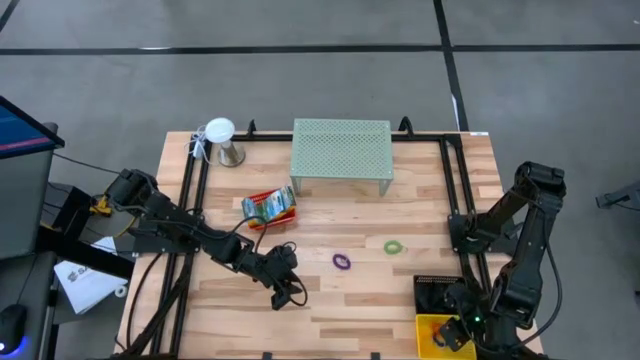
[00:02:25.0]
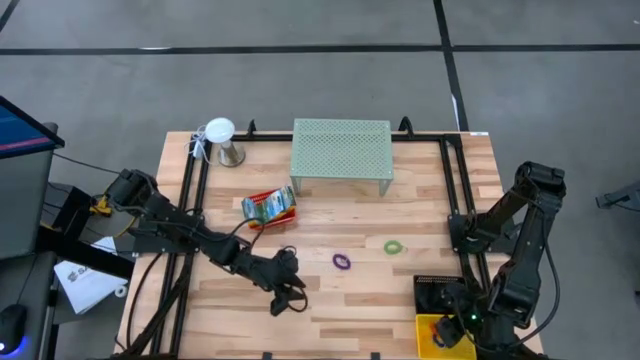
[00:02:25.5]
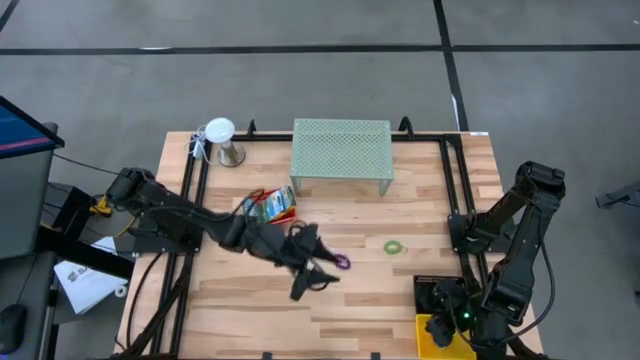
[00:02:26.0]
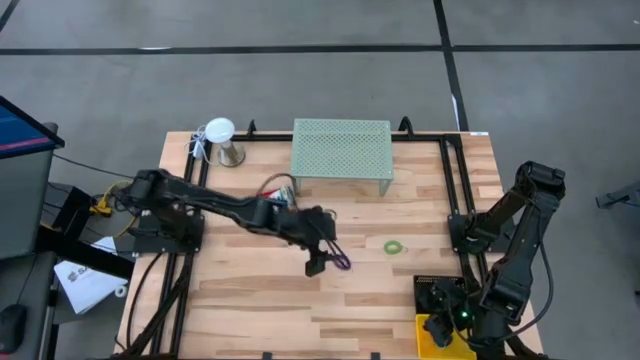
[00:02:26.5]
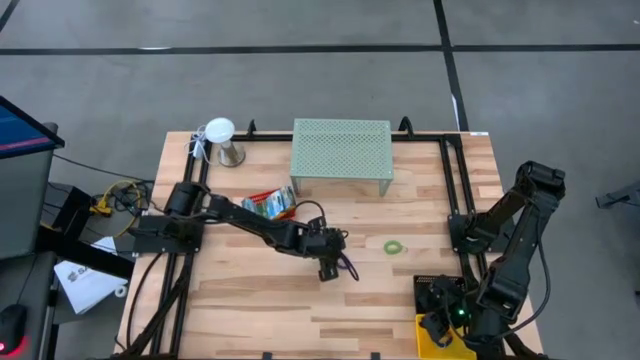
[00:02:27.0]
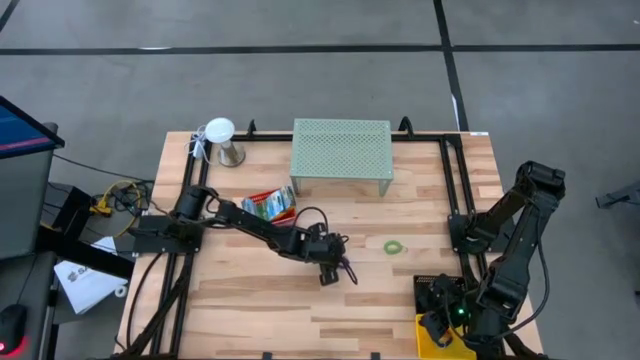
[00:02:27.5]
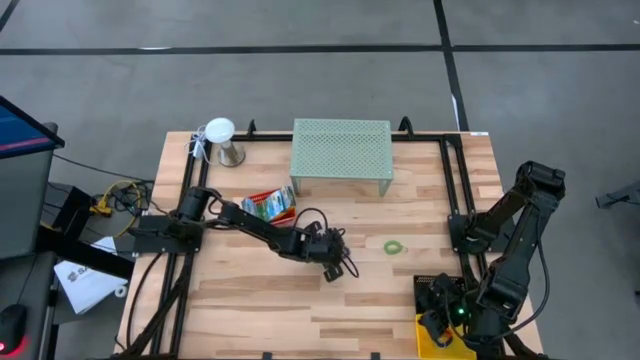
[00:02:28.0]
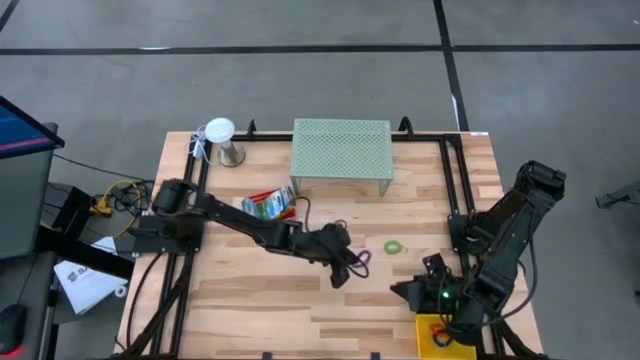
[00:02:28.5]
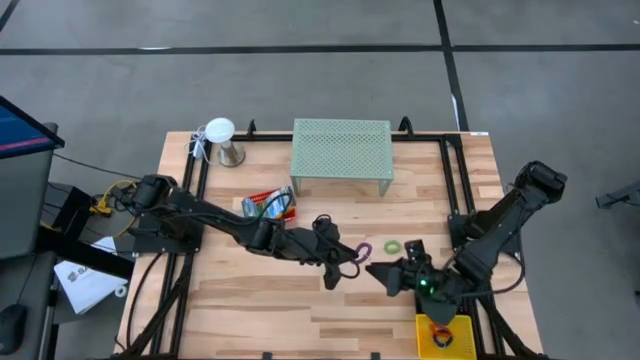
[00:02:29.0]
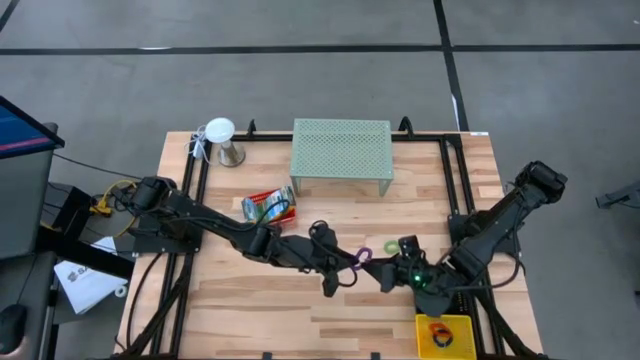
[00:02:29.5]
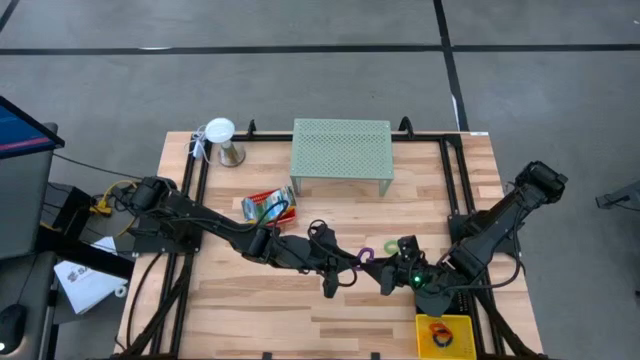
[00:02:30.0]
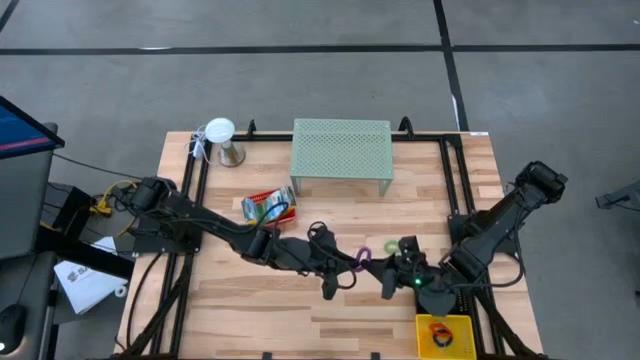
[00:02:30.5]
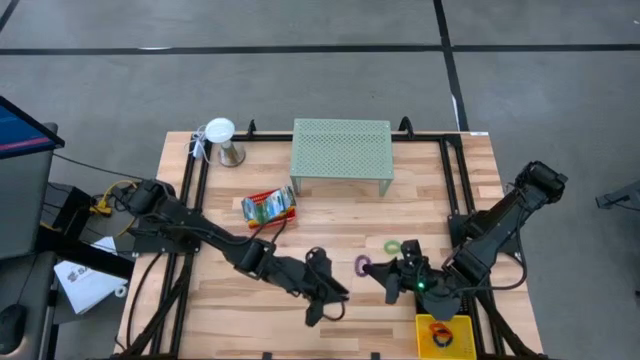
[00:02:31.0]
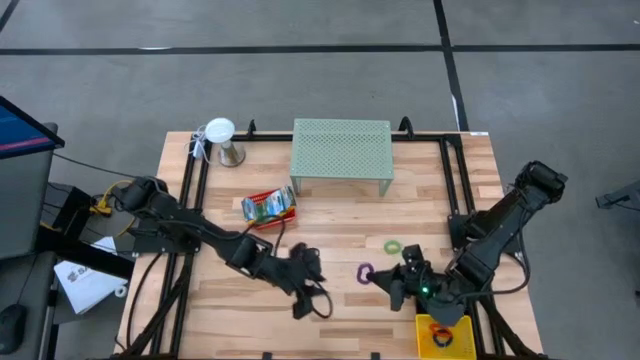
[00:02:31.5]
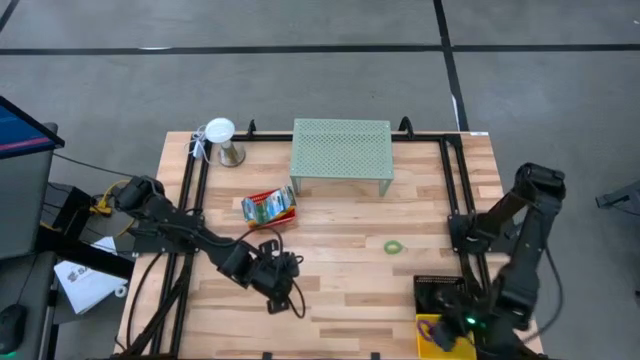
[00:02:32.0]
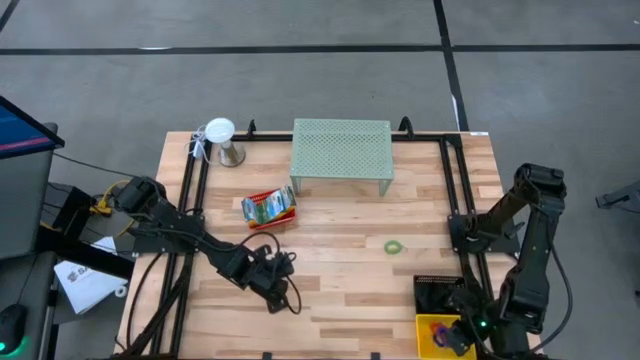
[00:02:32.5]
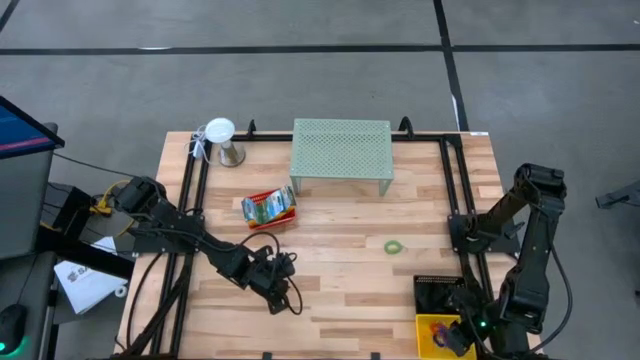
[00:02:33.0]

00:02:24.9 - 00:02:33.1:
Task: Pick & Place Office Desk Supplies
Put the violet spring keychain into the yellow bin

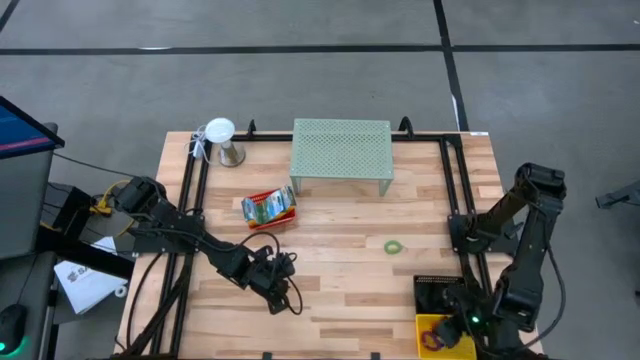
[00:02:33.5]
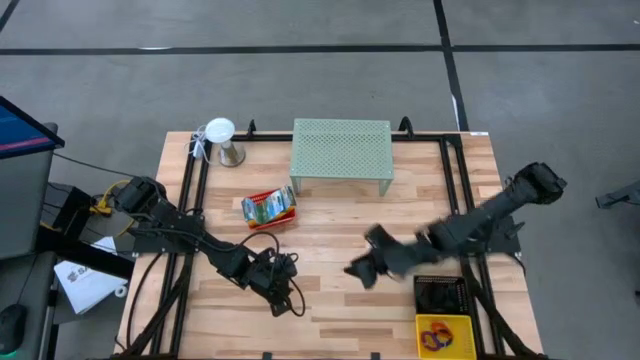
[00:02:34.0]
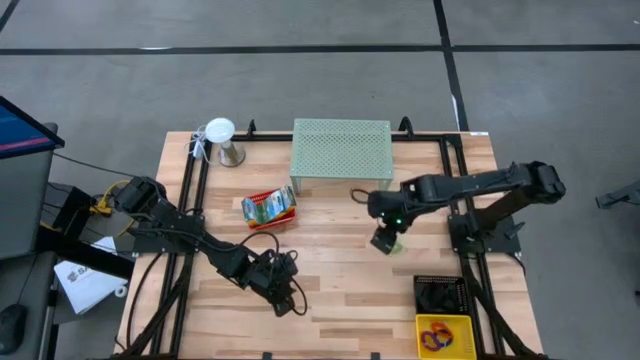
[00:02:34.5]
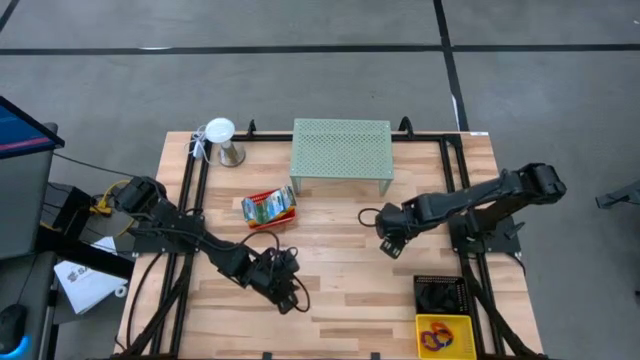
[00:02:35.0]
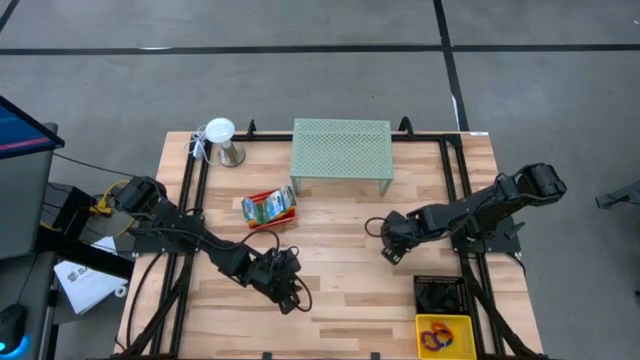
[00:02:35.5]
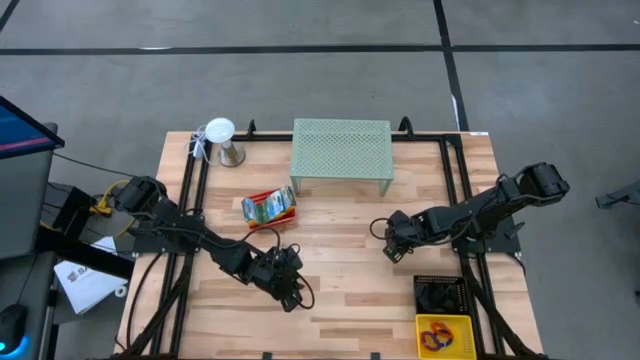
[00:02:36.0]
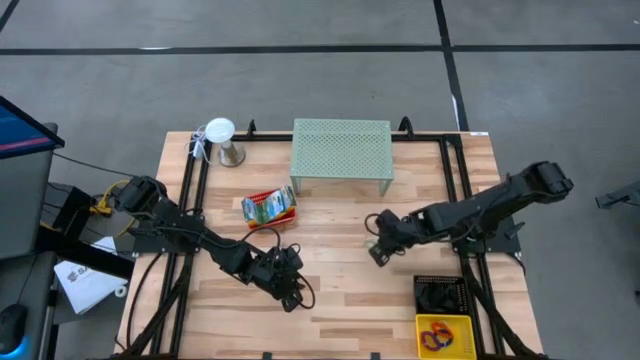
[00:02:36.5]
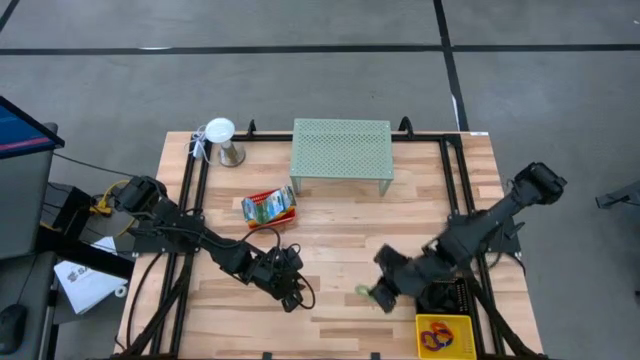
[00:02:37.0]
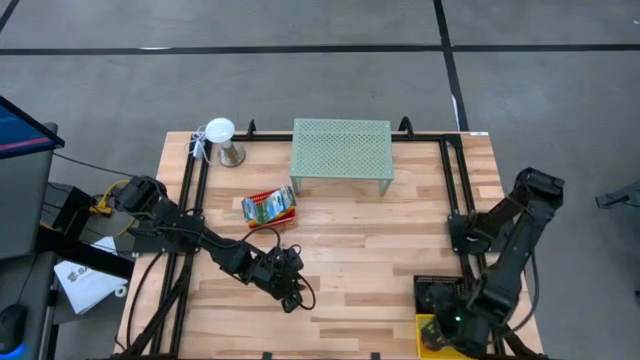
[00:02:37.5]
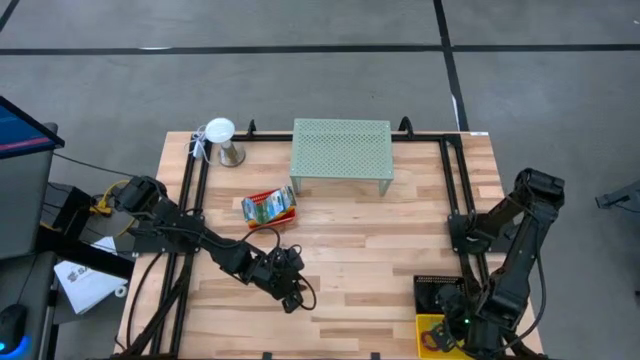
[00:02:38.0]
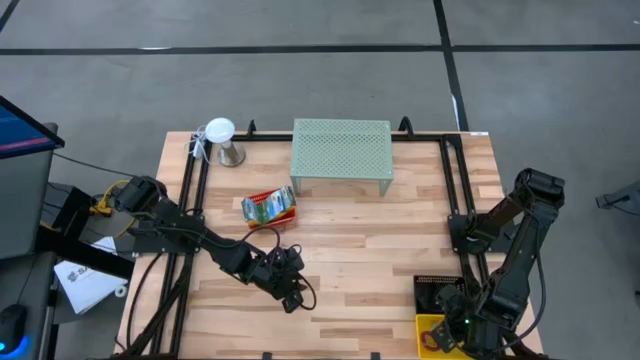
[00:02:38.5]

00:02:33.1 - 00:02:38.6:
Put the green spring keychain into the yellow bin

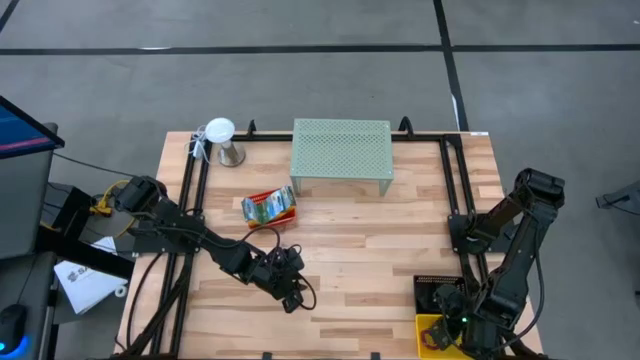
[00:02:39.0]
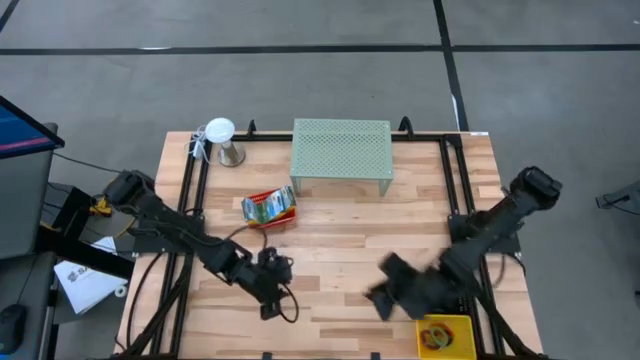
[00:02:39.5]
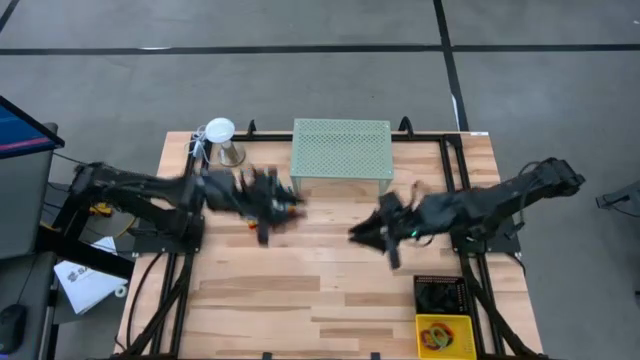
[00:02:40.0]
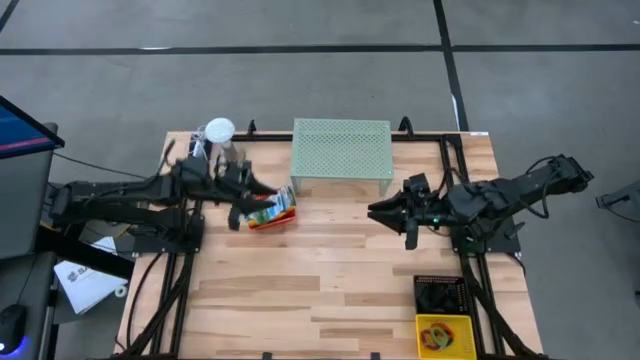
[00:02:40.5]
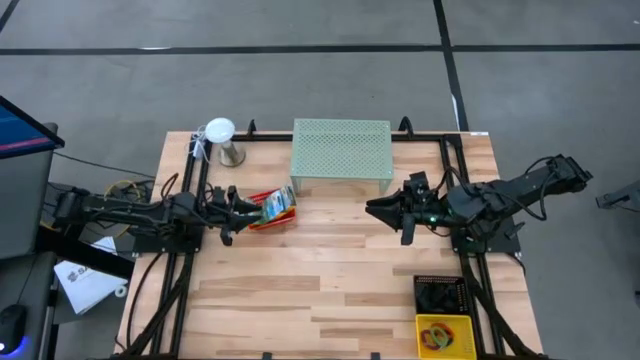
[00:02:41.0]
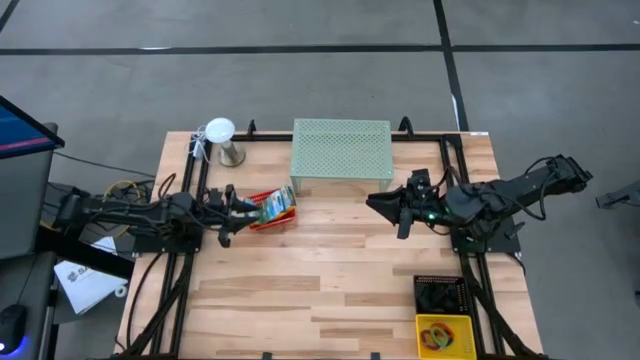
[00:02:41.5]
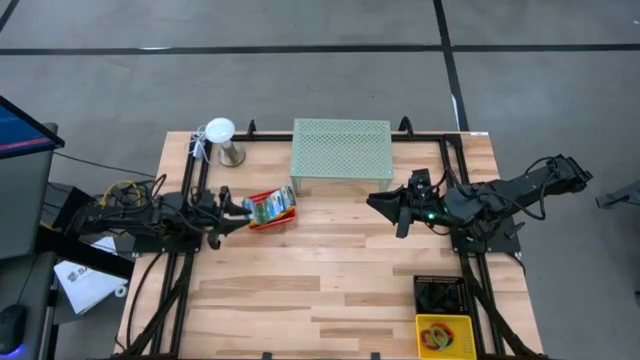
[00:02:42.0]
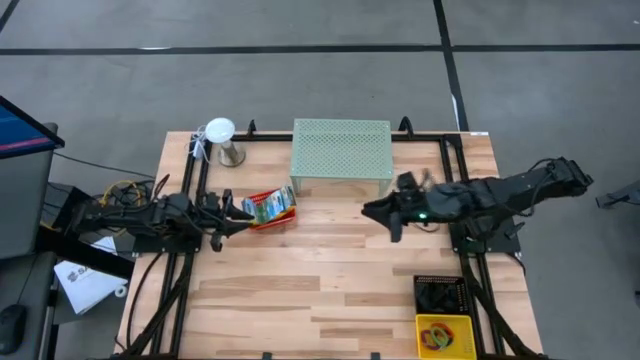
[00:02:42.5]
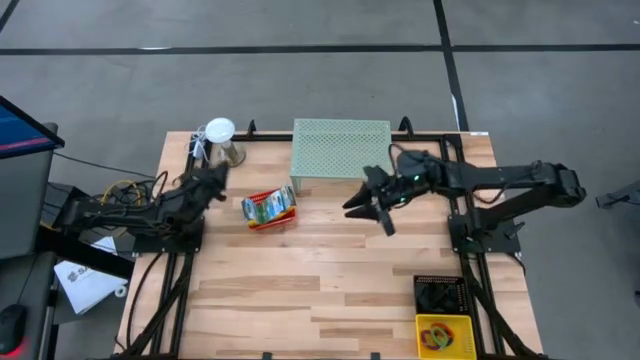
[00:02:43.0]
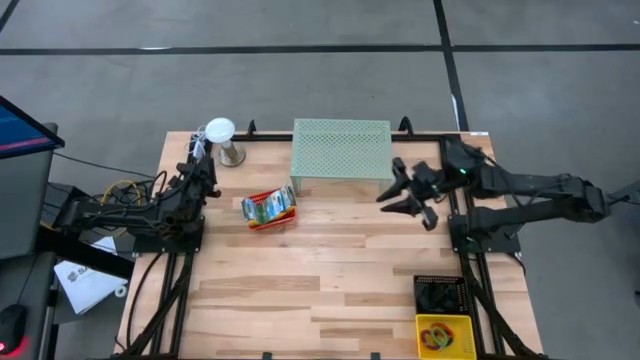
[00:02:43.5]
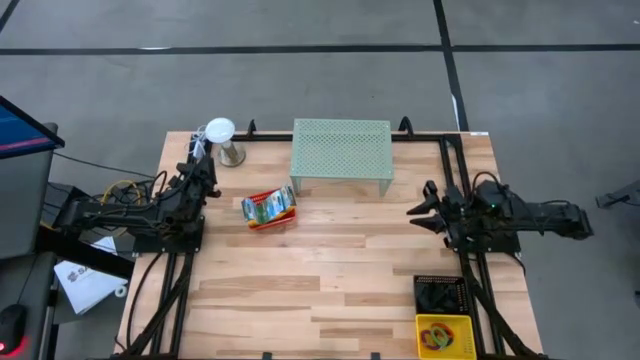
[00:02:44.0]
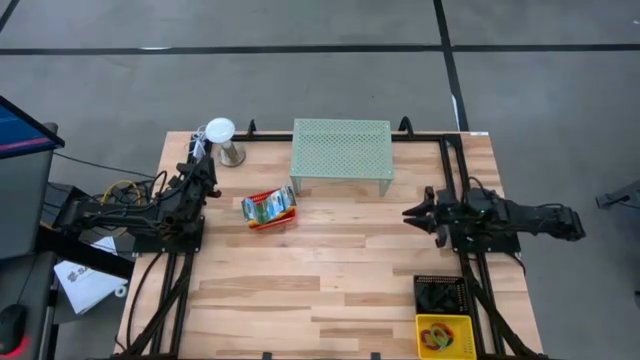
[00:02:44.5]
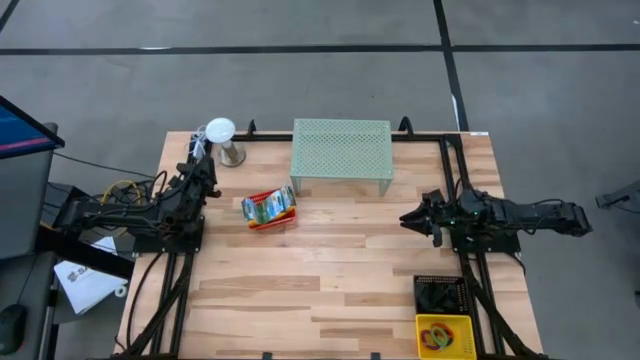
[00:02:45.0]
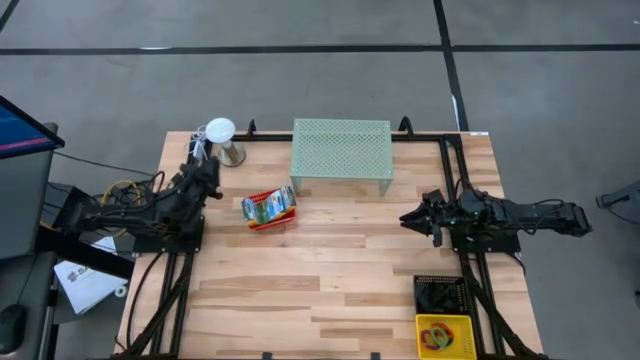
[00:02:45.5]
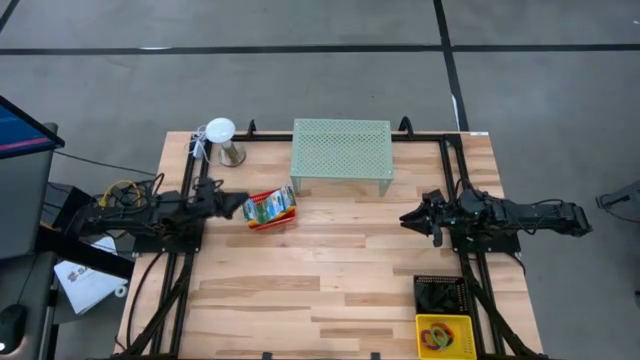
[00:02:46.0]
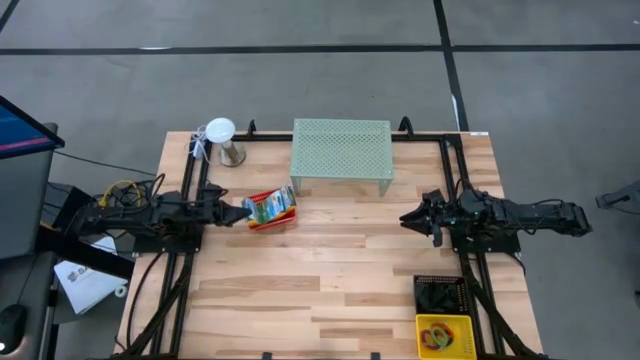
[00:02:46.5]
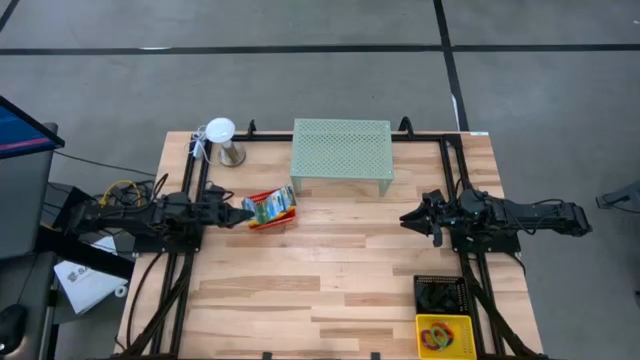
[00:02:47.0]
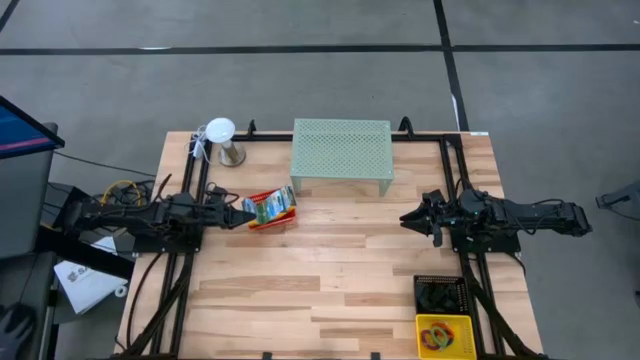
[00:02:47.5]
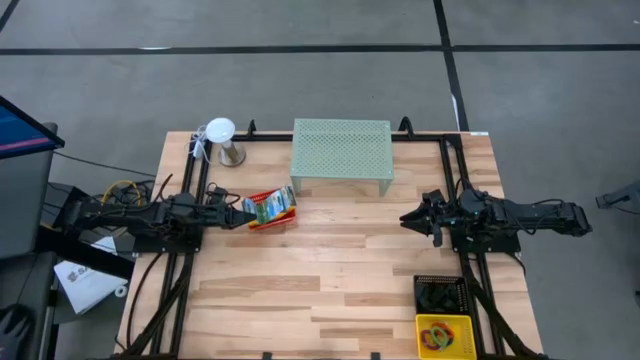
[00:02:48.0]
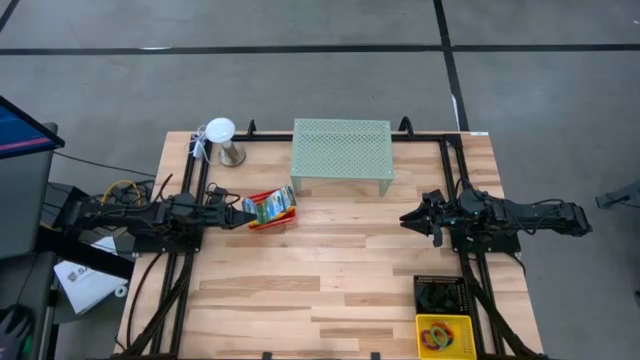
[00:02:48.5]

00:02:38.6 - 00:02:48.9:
Return to Home Position
